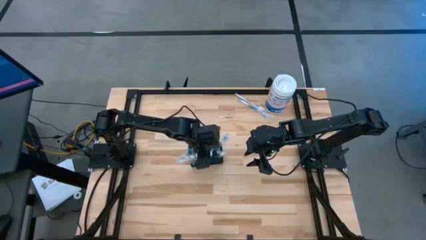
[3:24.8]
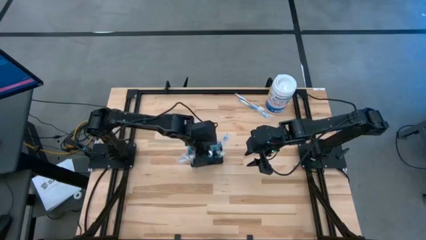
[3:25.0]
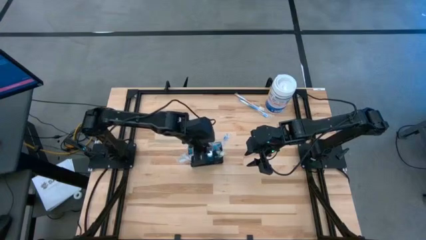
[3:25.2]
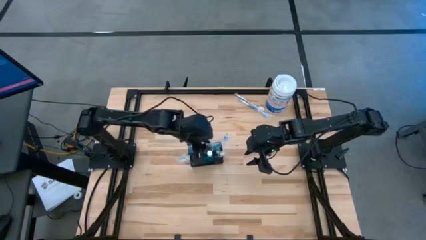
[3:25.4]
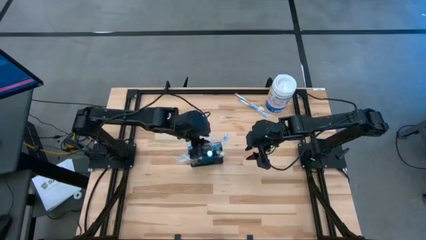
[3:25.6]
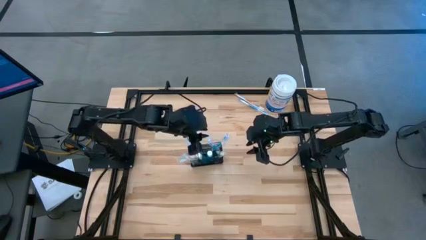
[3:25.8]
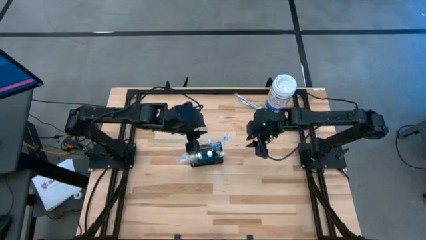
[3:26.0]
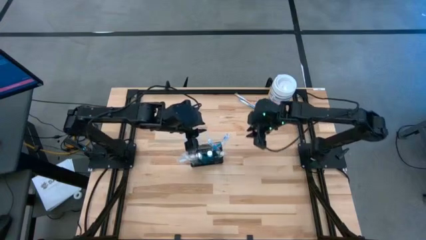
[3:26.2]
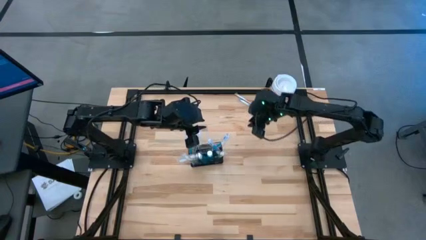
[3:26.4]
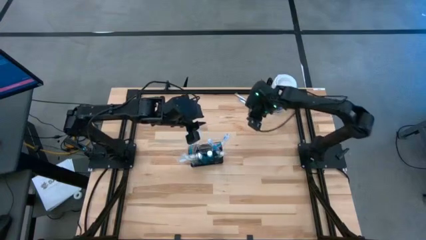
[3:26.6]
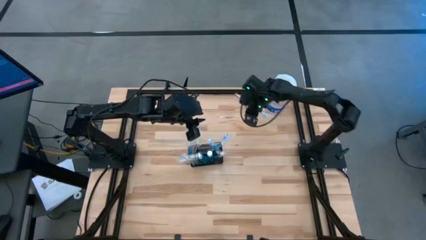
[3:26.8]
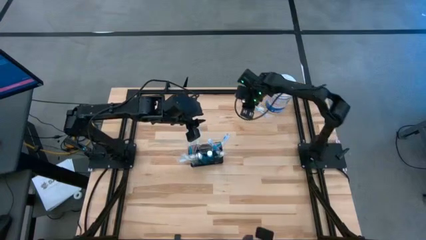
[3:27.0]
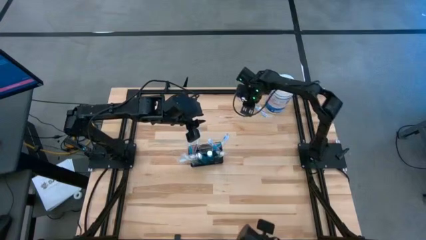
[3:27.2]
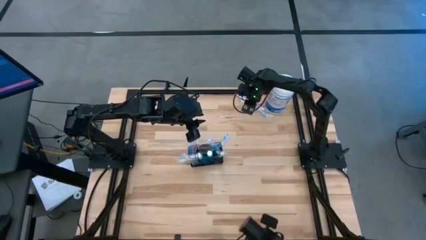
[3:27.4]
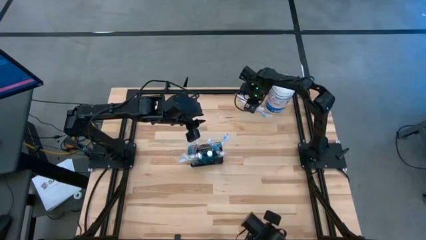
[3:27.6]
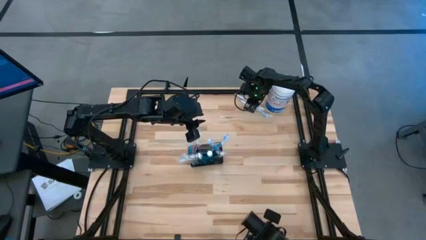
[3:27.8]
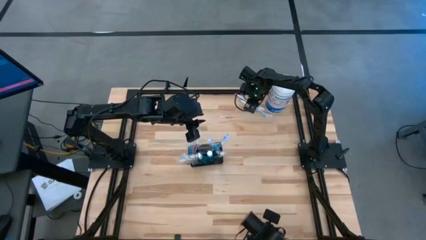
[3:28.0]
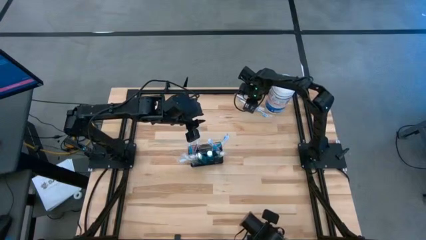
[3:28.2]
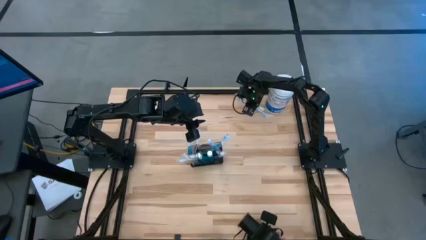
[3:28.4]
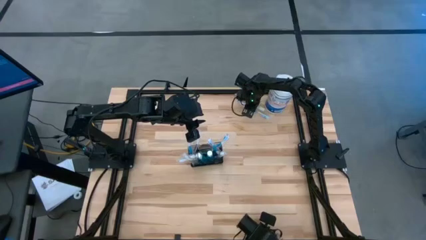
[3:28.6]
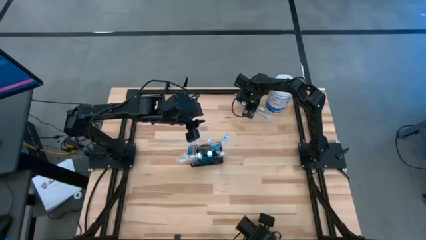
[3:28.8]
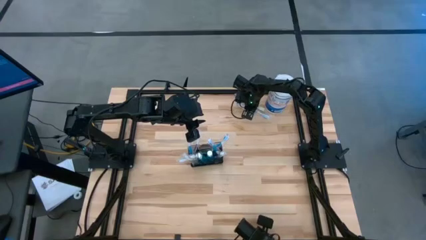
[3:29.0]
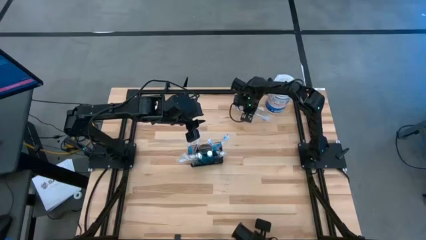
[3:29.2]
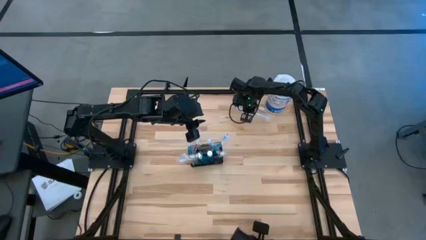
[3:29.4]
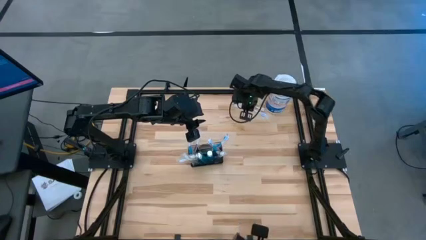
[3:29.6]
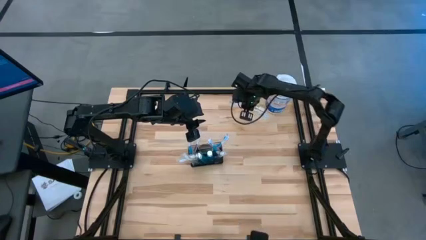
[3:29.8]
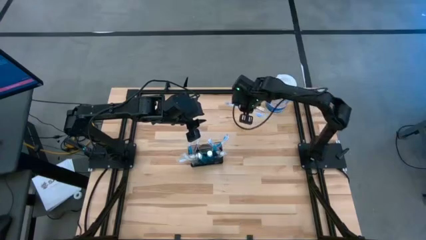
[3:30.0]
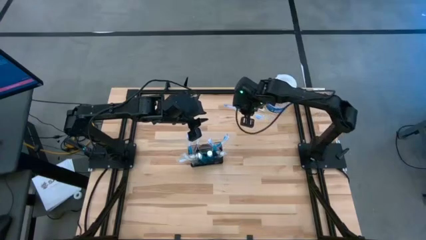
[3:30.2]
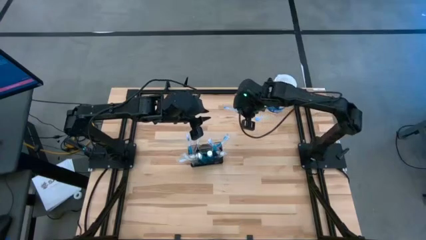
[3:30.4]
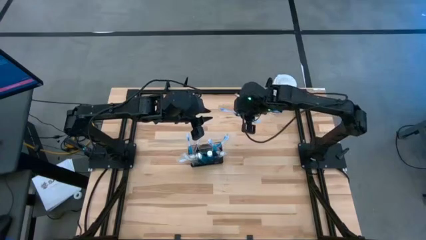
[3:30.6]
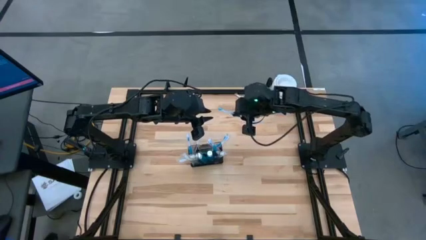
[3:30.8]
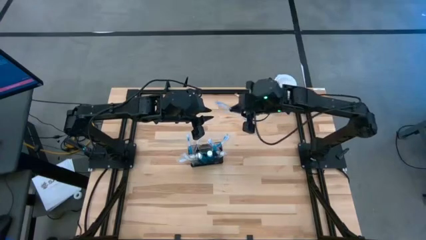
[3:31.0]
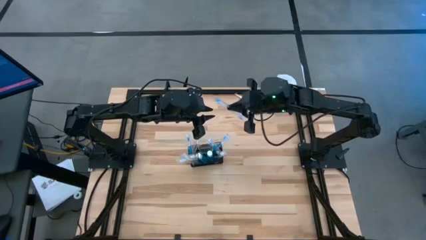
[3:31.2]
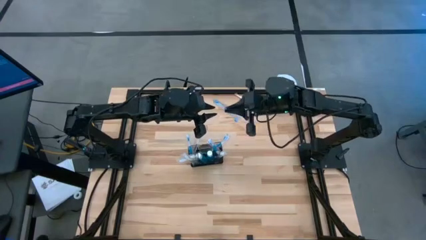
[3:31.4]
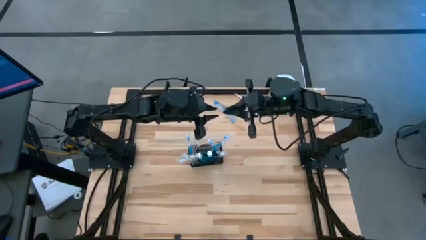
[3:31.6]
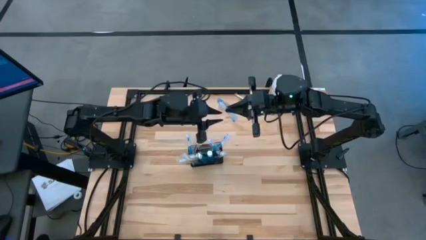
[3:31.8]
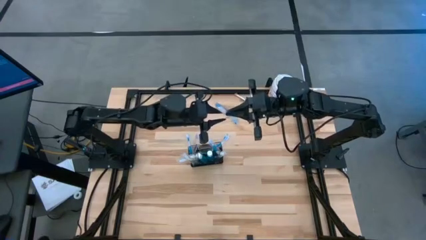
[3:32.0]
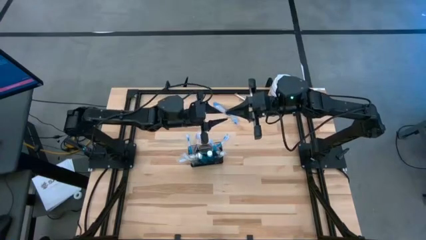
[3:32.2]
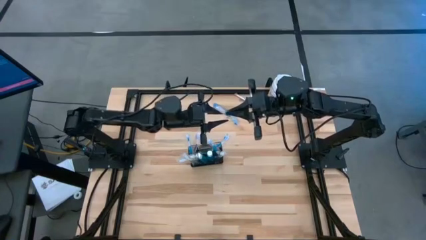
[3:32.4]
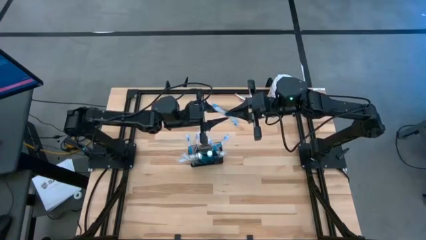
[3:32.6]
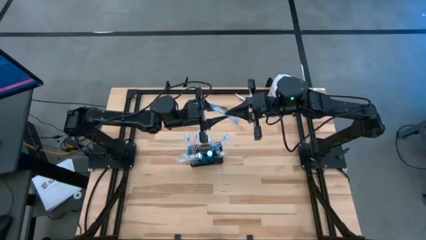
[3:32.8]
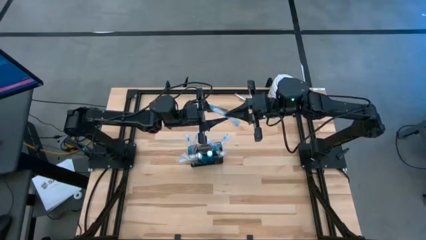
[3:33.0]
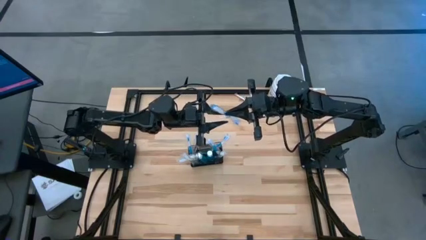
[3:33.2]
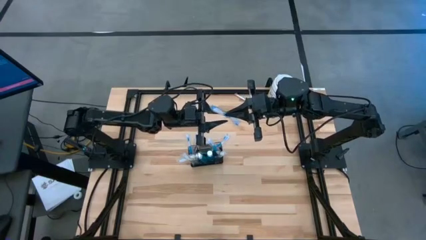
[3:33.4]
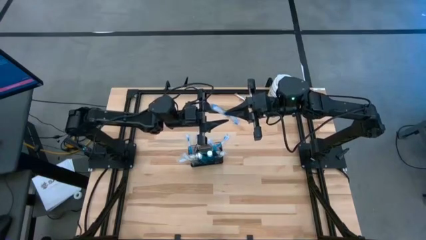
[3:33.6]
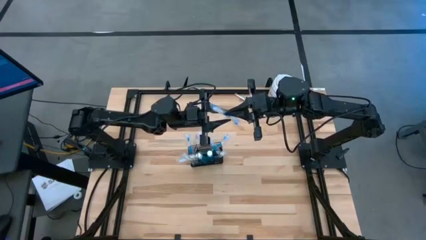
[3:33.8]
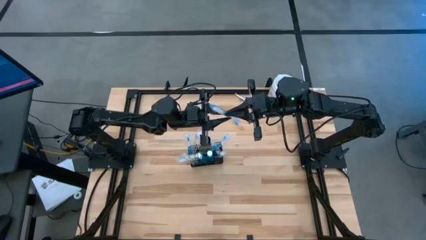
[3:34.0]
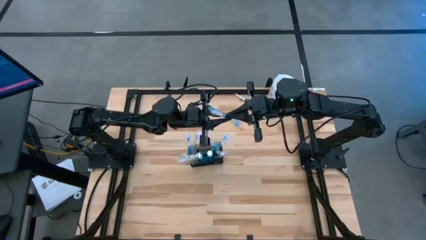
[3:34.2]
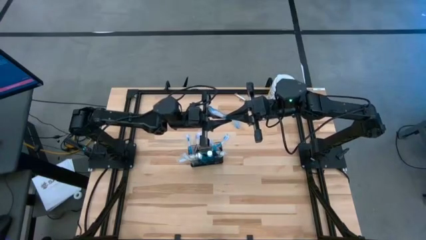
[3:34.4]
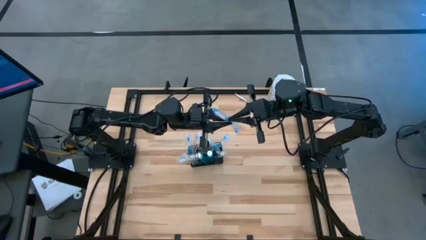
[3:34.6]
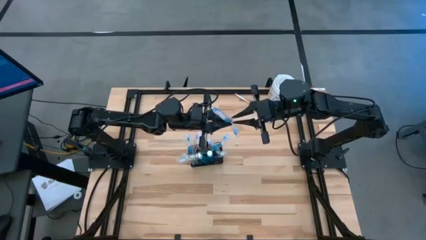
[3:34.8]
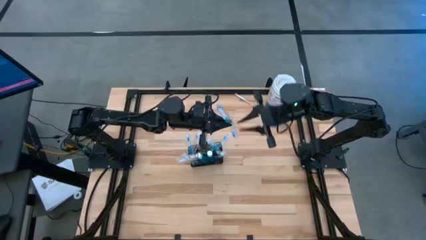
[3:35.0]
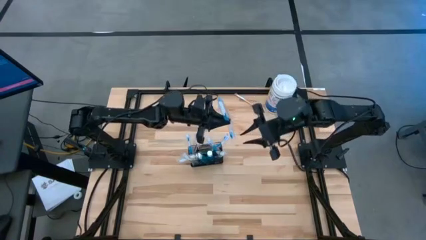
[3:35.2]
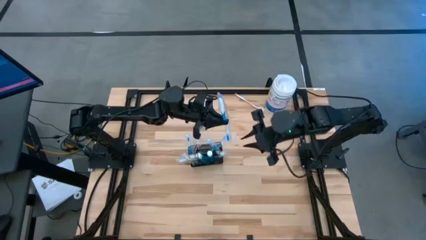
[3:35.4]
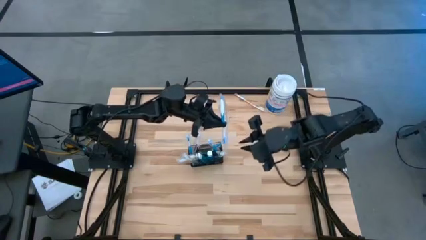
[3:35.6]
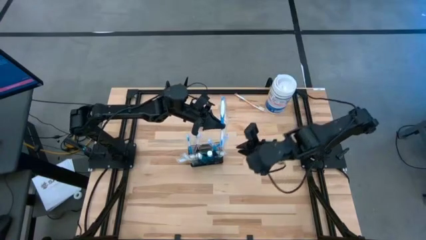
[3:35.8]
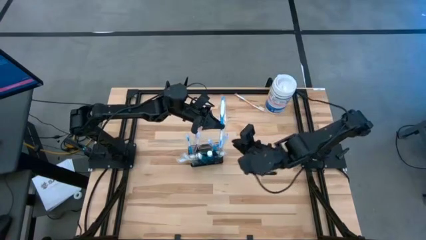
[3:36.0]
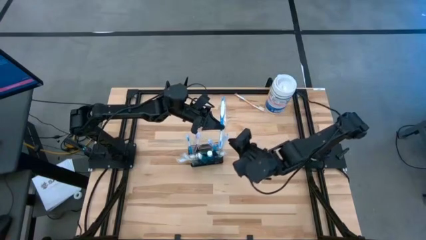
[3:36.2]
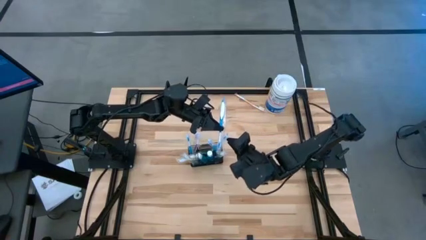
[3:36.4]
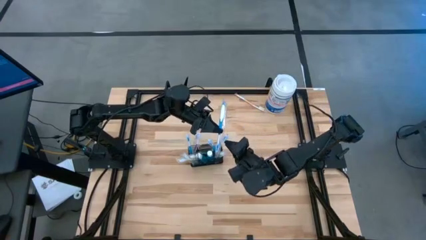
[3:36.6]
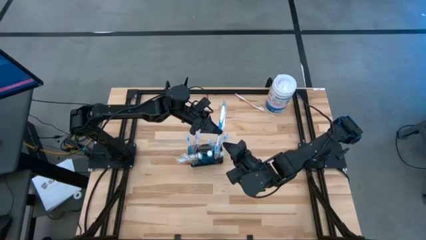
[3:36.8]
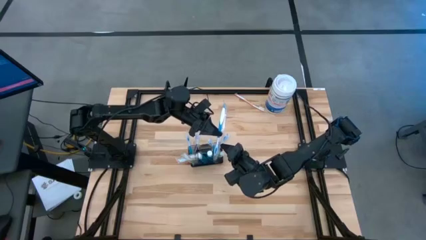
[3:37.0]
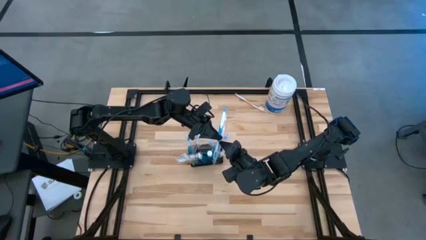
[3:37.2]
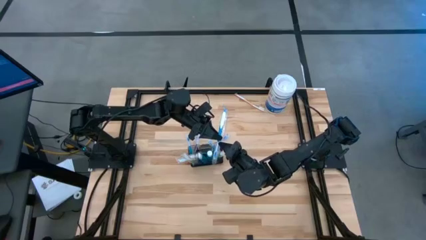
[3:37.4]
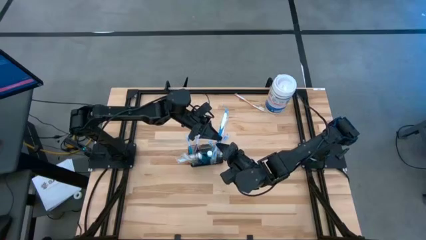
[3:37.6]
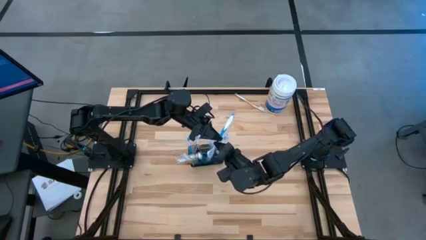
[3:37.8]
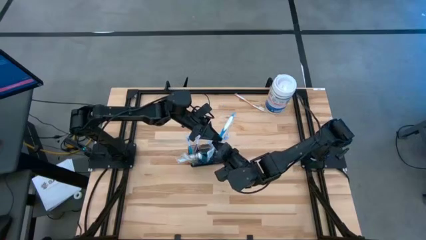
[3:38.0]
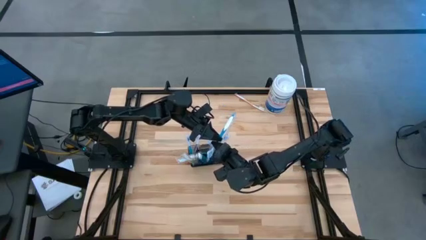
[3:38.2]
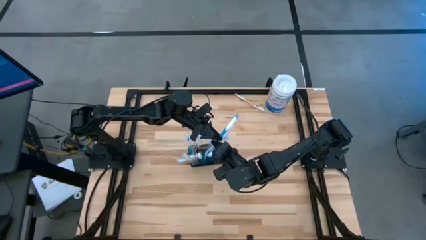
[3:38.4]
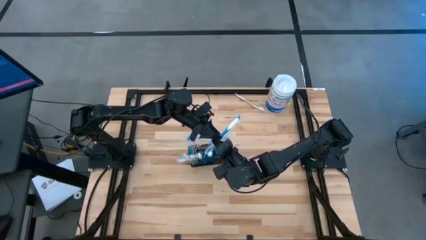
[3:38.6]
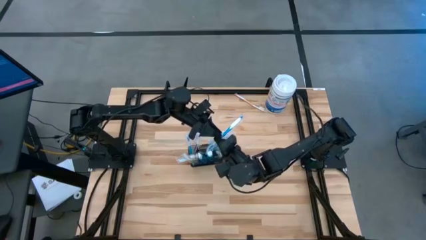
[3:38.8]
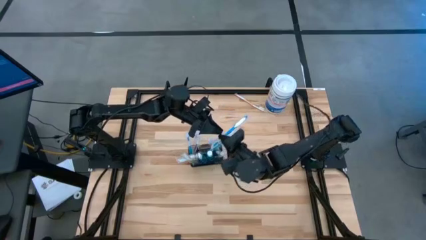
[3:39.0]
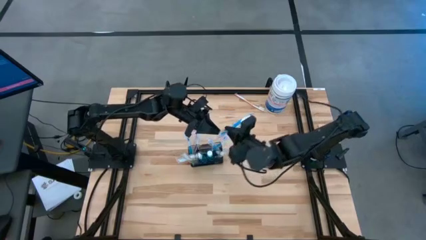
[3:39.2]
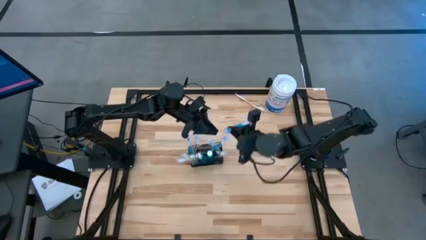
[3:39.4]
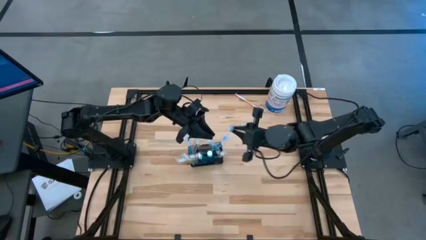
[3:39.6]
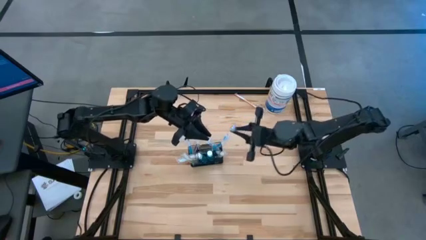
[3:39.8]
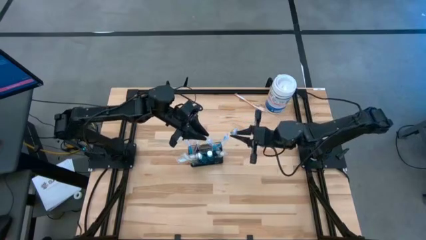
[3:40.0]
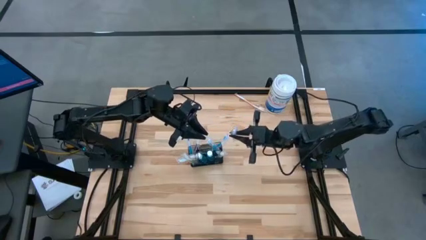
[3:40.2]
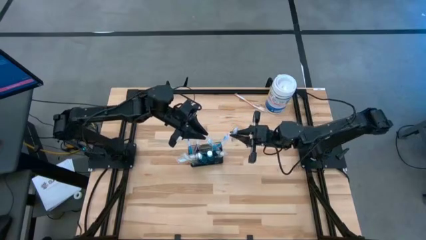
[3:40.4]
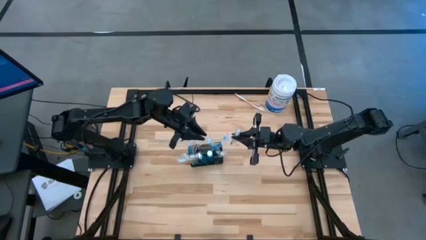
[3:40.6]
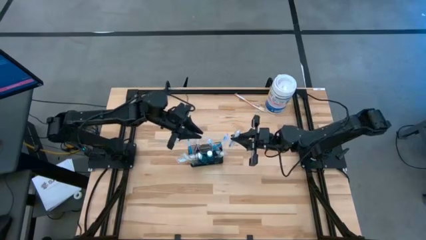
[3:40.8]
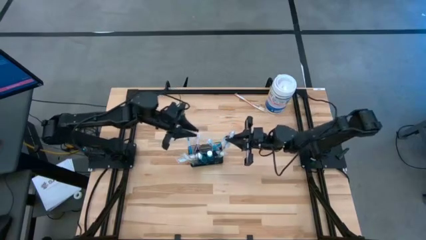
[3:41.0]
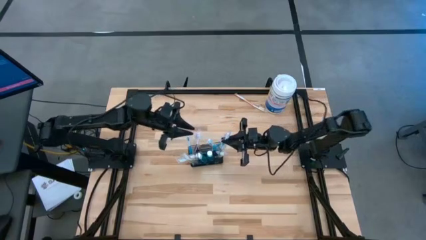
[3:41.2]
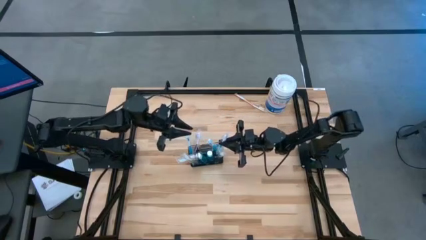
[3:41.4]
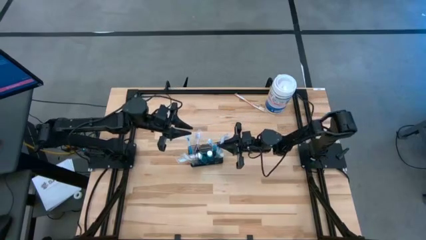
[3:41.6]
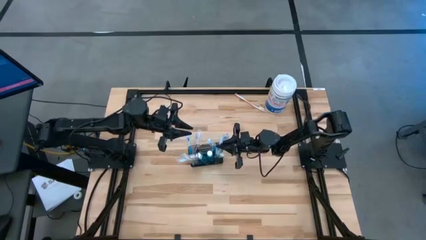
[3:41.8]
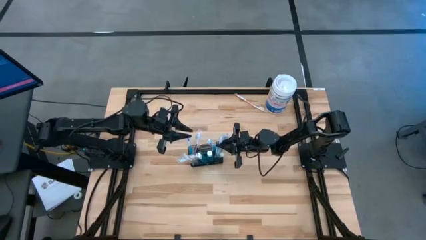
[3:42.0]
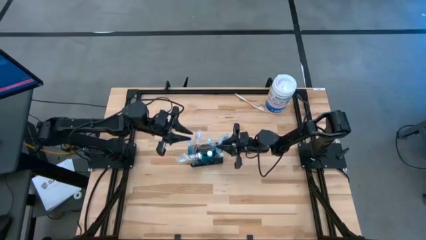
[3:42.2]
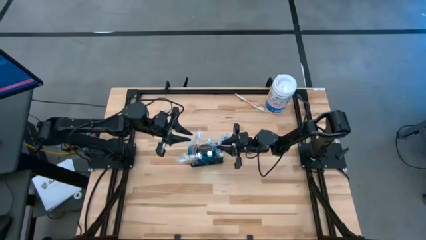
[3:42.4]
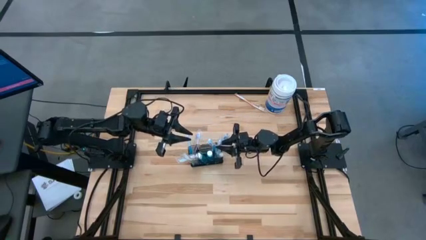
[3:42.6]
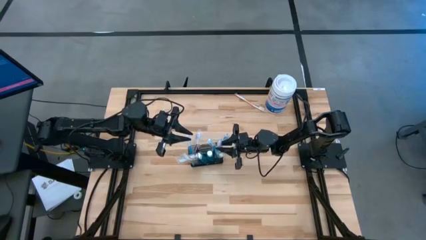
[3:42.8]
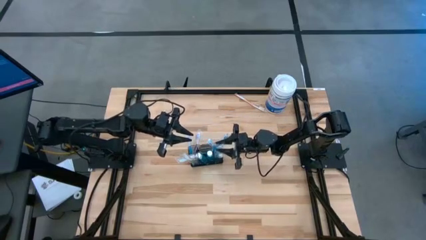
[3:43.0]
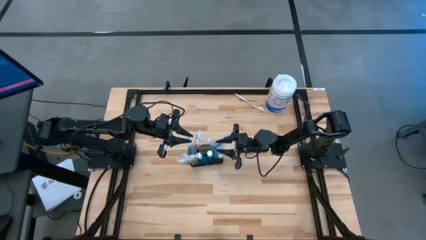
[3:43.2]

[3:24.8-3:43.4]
Task: Pick & Place toothbrushing station
Put the blue toothbrush into the wire organizer
